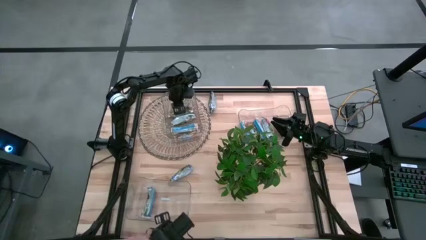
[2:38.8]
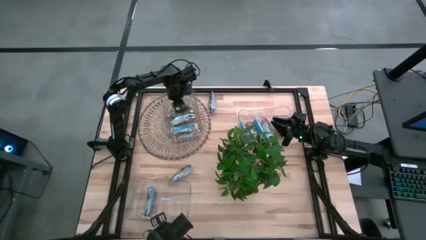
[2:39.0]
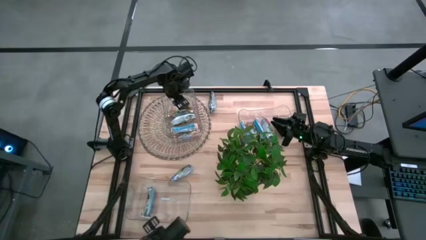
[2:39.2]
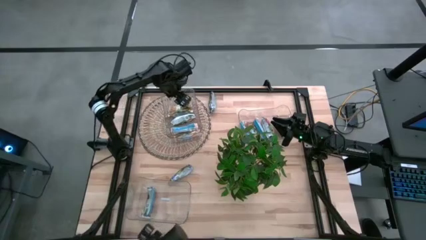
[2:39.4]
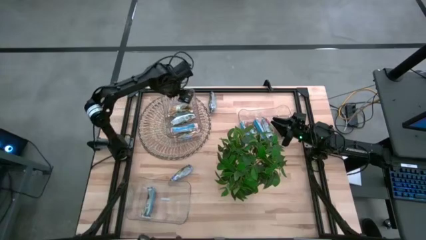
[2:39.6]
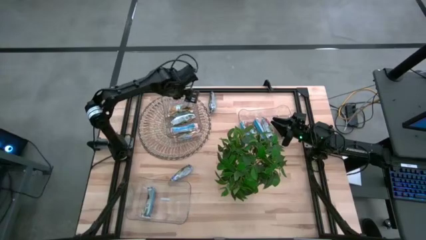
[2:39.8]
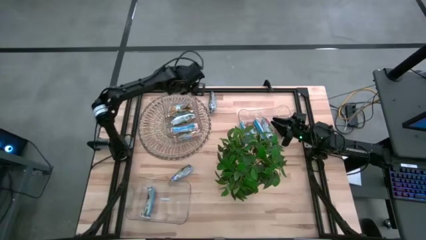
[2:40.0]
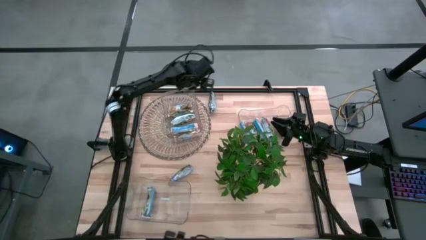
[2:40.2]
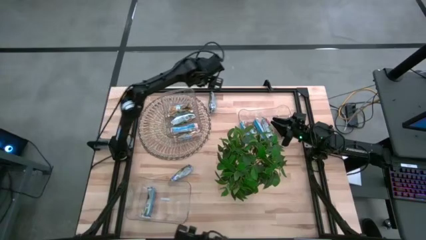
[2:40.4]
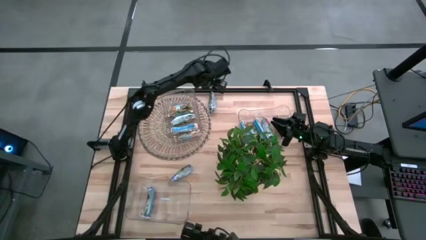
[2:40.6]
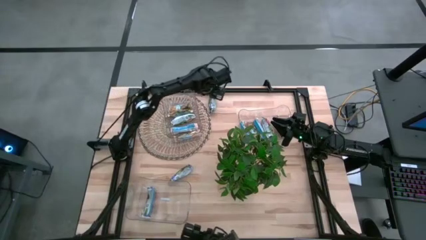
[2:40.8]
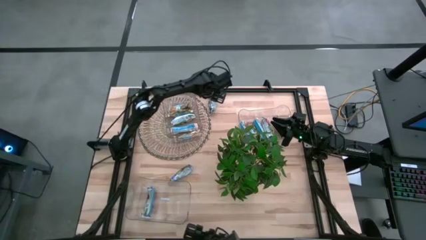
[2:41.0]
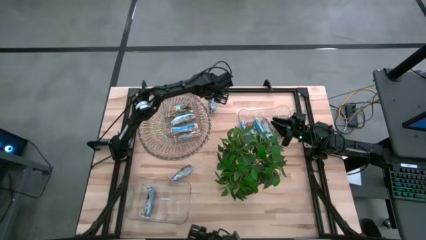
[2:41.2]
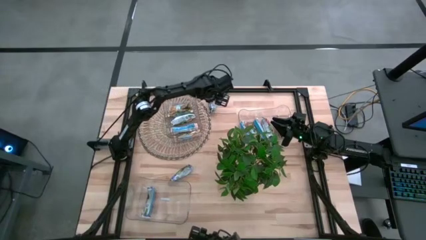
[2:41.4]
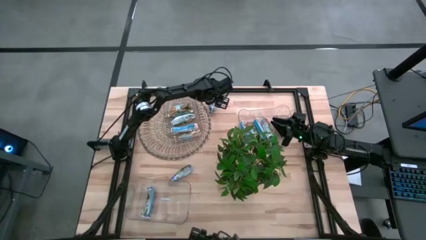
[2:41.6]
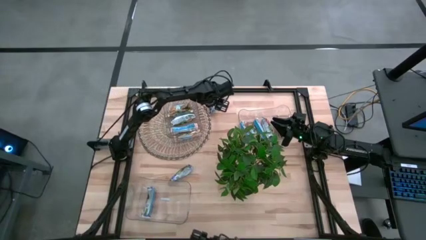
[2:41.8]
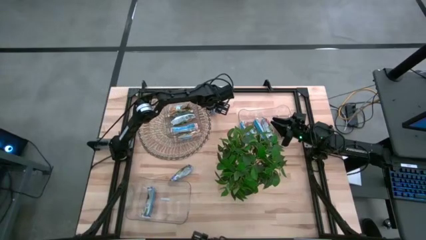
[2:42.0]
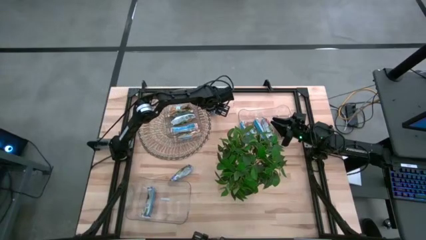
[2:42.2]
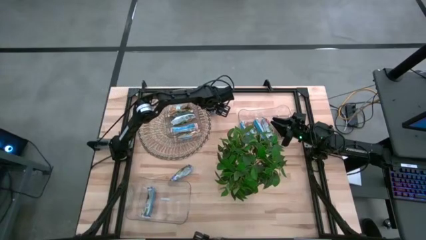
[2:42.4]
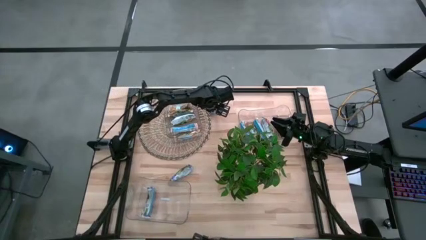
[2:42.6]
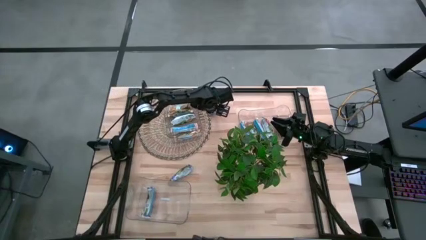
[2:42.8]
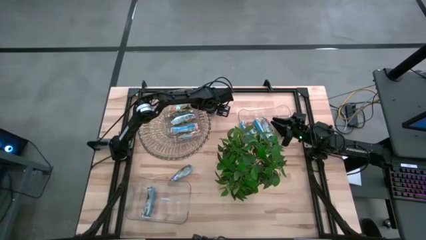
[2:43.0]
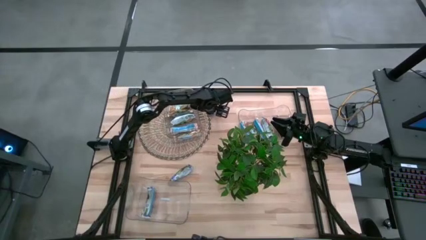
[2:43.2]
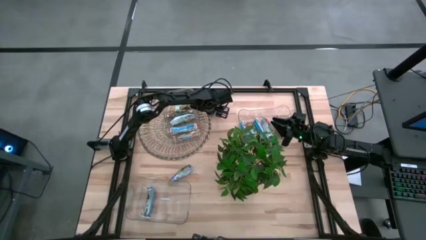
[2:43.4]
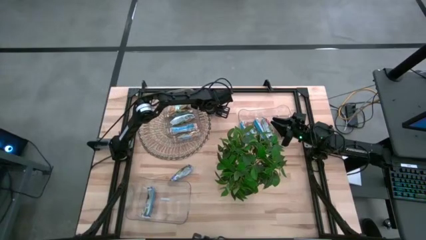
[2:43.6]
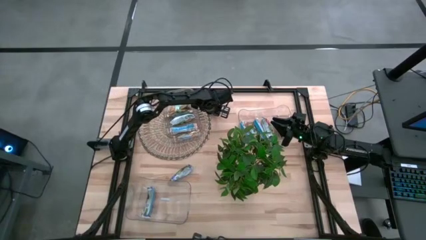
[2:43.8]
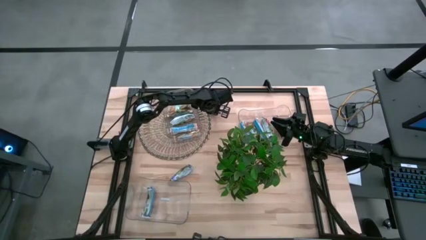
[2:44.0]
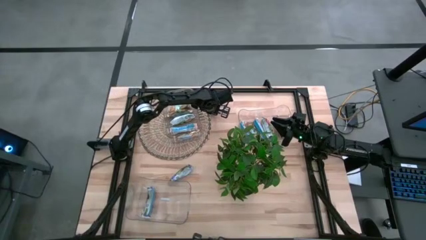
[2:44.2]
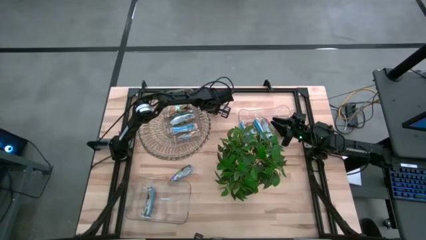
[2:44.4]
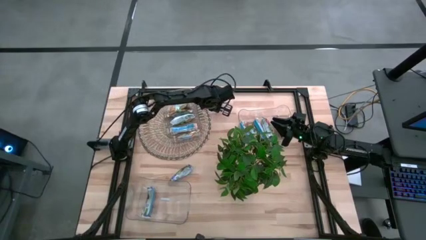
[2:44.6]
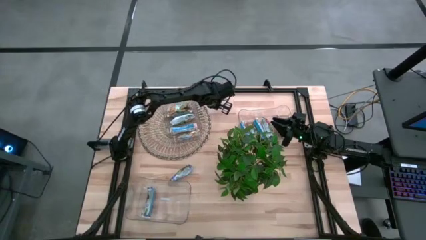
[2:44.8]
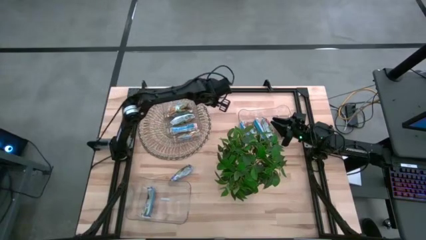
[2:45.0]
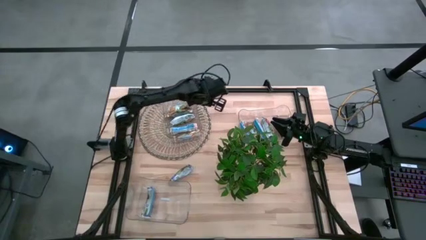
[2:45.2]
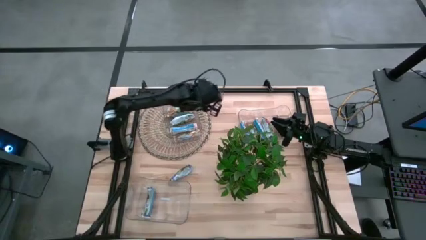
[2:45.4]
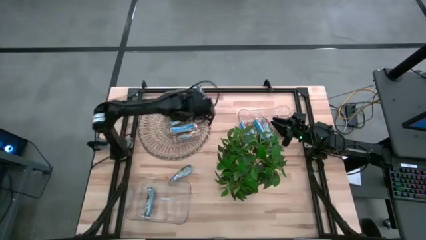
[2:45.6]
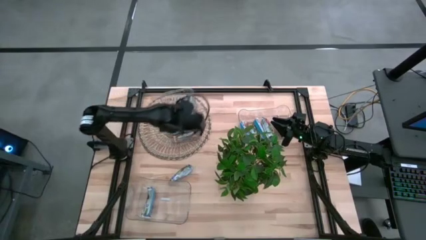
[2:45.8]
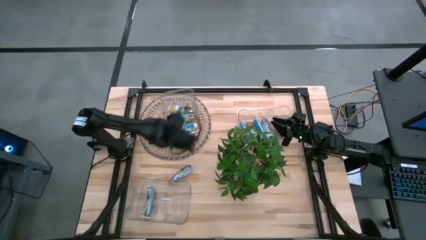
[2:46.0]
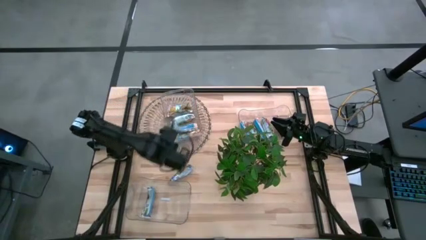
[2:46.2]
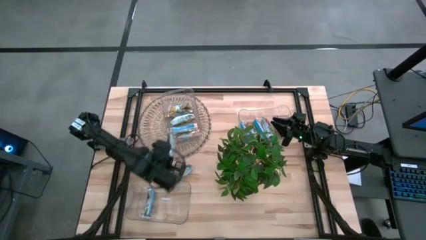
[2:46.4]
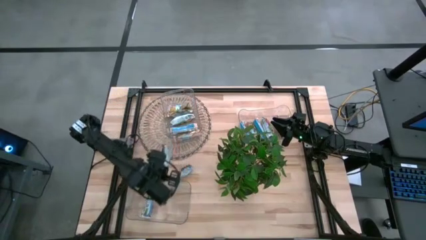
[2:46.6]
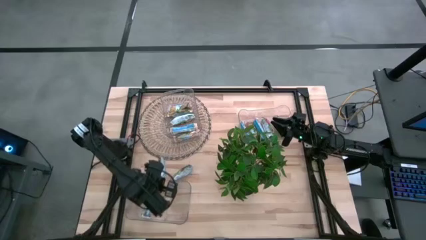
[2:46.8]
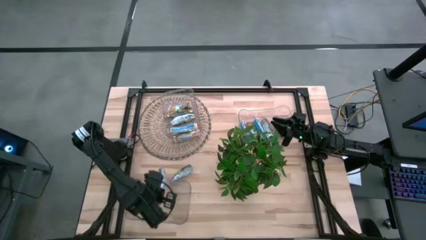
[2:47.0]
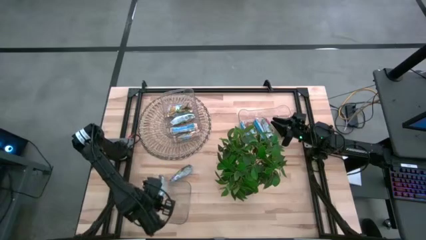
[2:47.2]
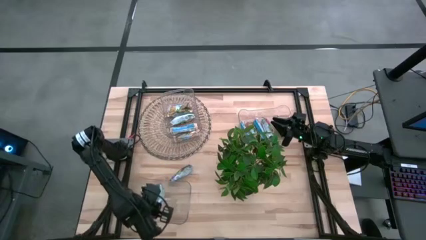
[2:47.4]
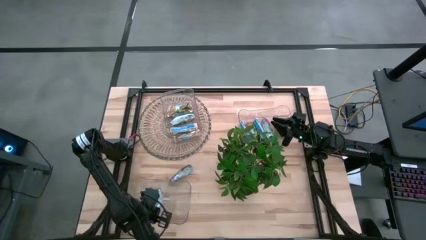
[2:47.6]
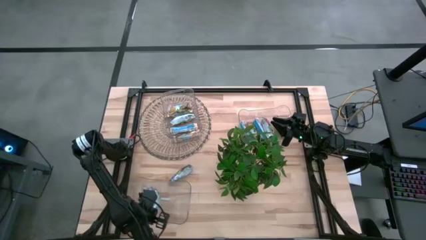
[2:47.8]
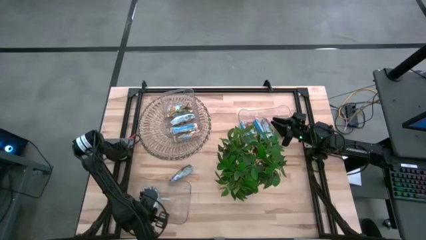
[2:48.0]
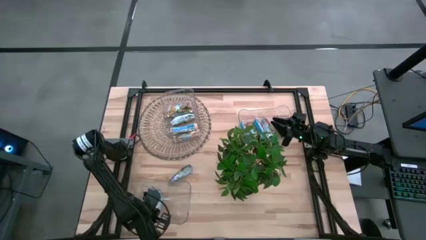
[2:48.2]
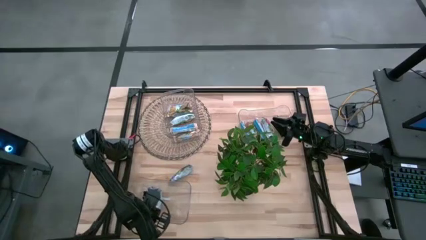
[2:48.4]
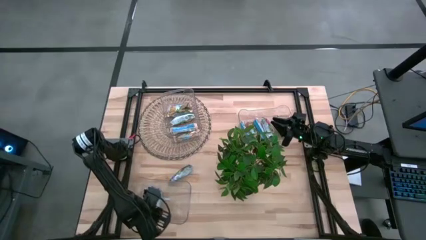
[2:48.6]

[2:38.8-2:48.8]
Task: Pick and place Granola Bars by type
Put the top blue granola bar into the bottom left transparent bin

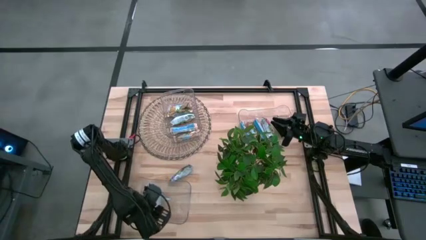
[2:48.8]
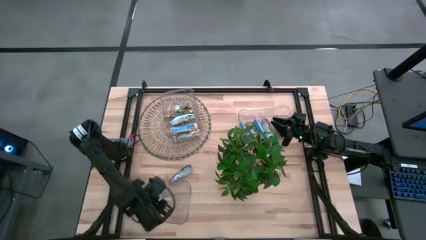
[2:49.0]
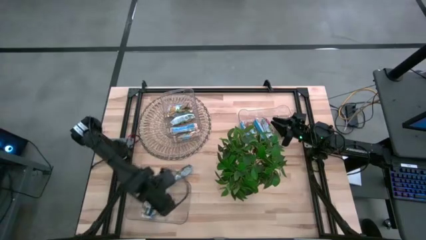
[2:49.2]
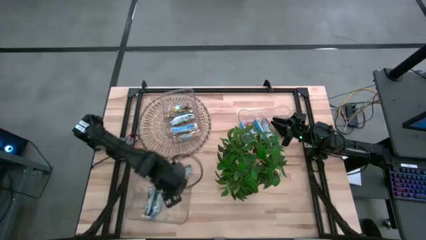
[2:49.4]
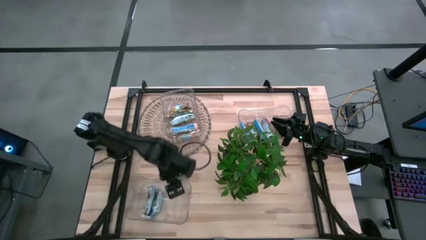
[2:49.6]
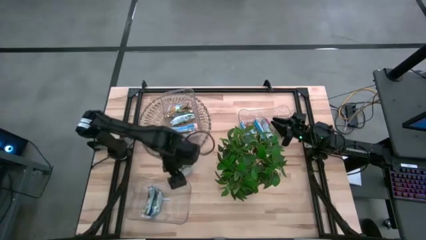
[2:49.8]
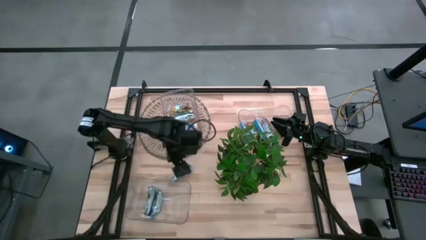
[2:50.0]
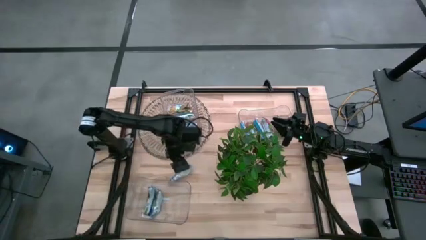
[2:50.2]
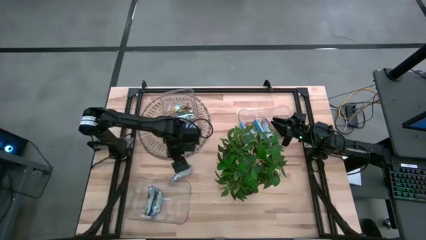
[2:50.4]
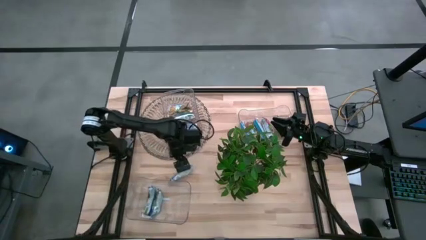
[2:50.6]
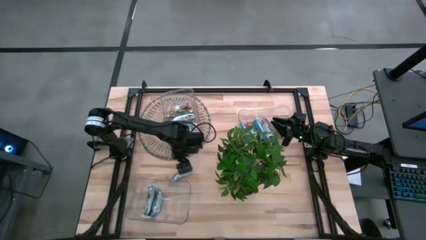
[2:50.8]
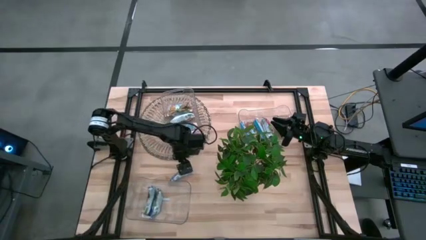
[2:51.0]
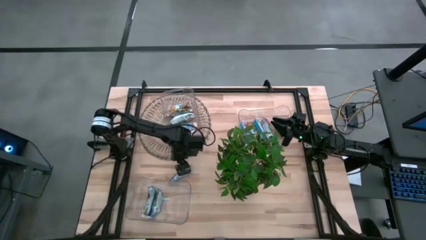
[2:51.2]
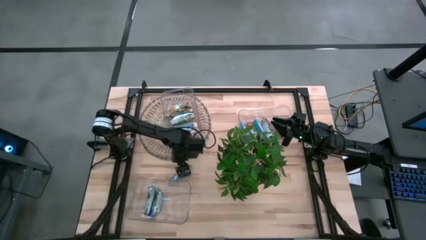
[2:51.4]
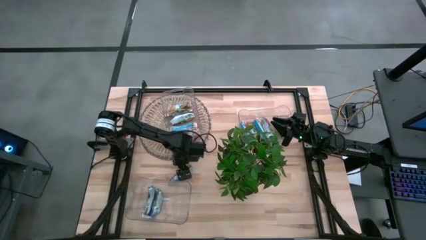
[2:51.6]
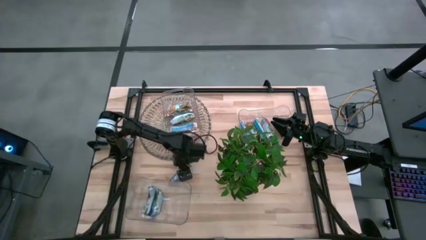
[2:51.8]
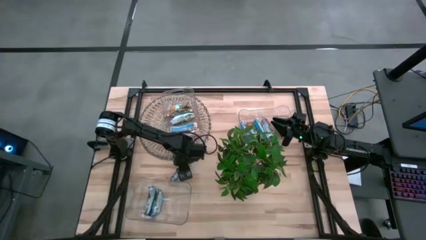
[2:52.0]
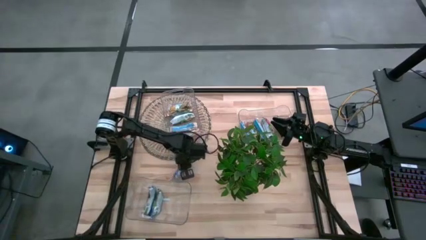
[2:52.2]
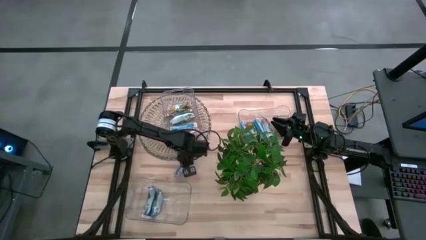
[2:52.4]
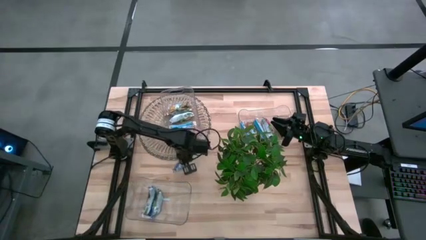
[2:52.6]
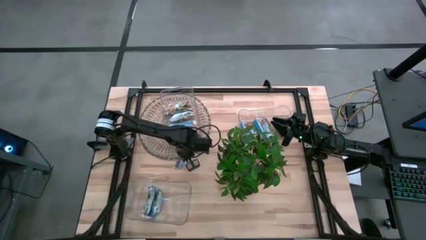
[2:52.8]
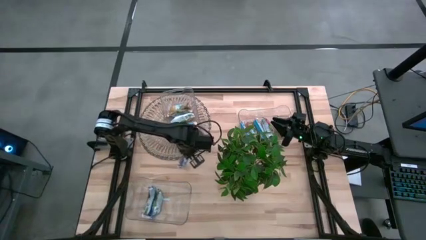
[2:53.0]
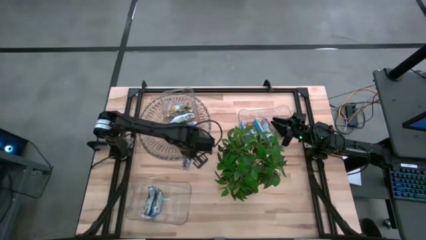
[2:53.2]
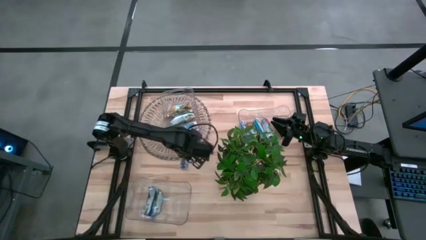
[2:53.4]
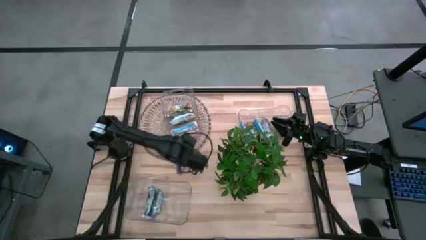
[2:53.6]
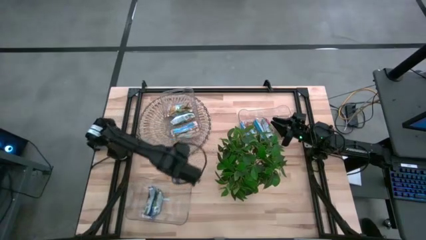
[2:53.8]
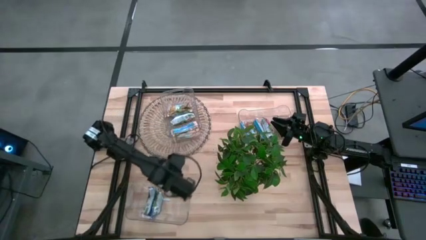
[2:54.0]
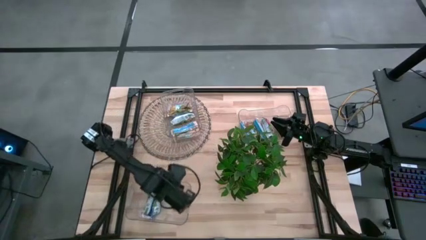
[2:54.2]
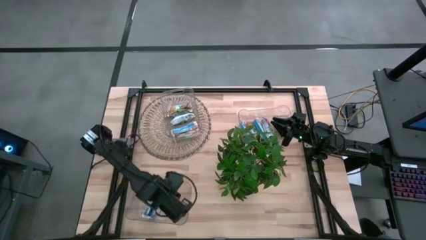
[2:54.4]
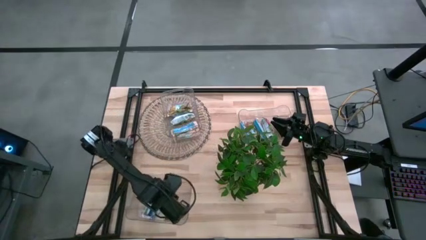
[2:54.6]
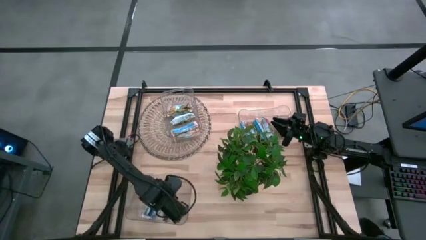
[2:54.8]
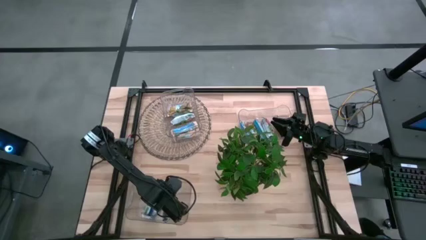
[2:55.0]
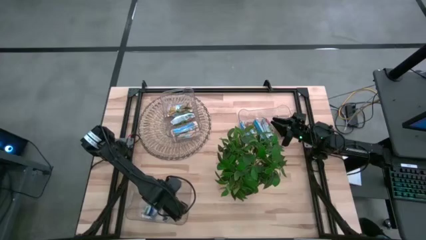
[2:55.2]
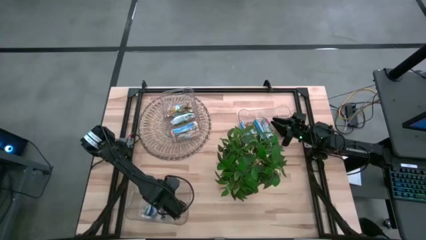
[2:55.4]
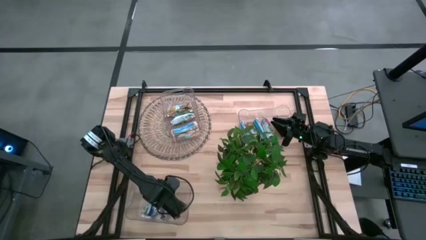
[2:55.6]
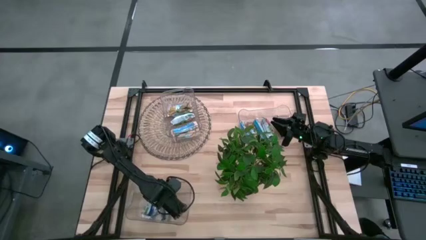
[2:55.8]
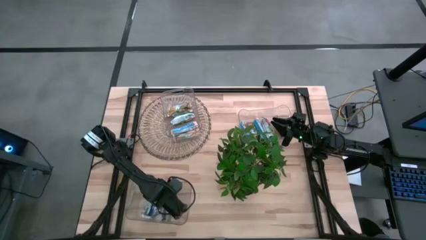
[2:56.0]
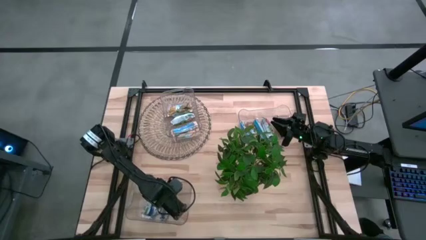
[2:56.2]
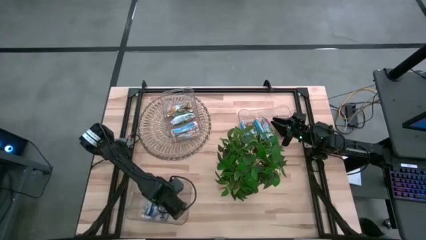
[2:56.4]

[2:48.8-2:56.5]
Put the blue granola bar into the bottom left transparent bin
